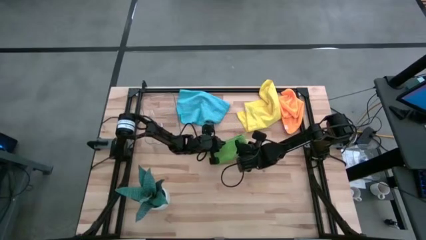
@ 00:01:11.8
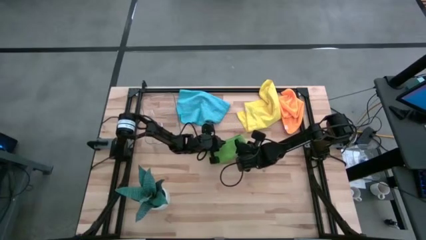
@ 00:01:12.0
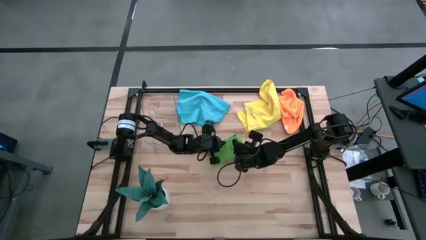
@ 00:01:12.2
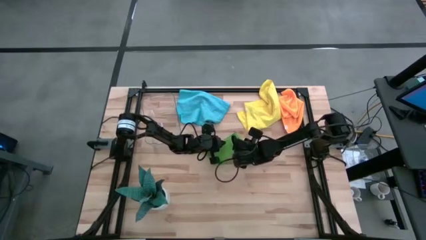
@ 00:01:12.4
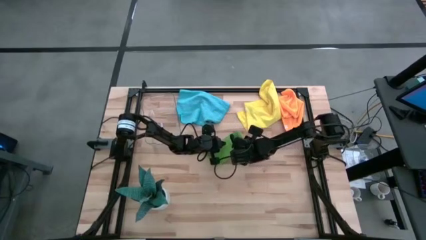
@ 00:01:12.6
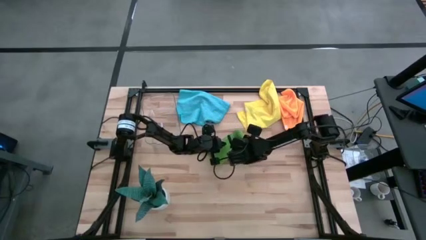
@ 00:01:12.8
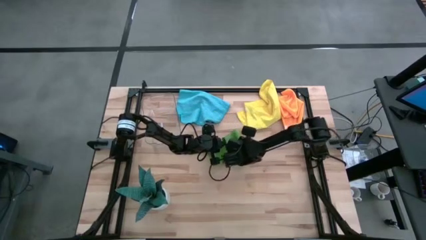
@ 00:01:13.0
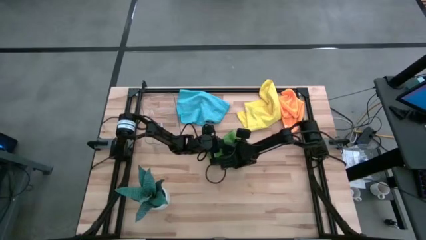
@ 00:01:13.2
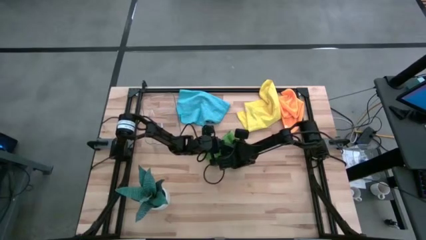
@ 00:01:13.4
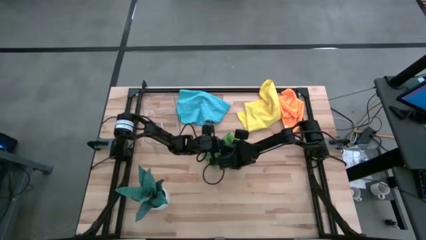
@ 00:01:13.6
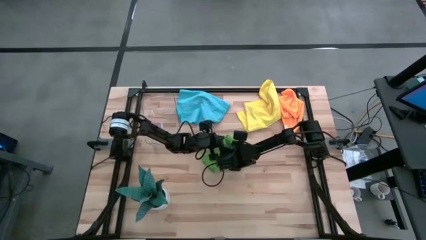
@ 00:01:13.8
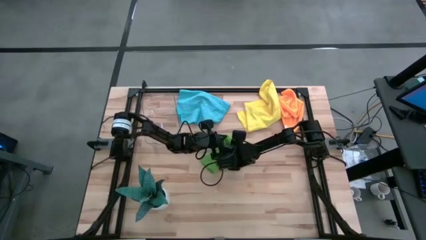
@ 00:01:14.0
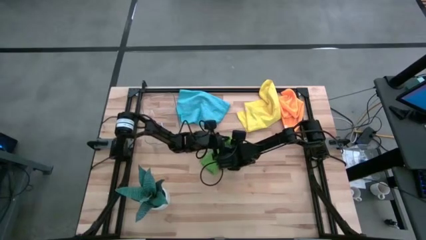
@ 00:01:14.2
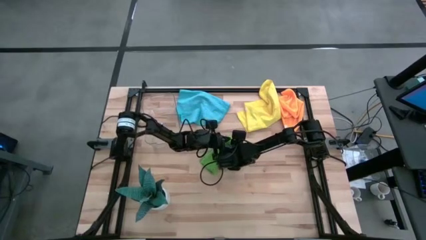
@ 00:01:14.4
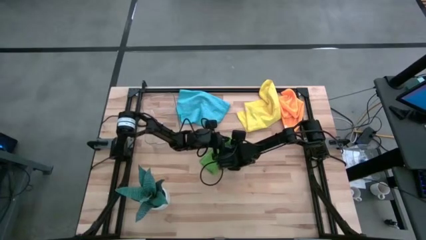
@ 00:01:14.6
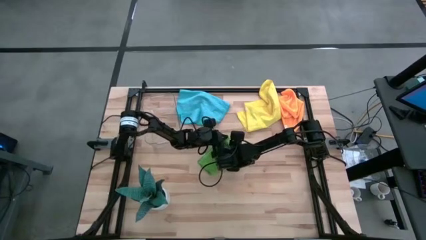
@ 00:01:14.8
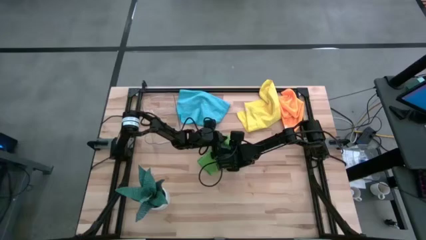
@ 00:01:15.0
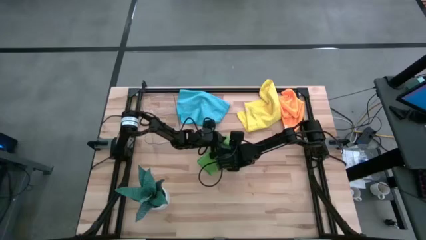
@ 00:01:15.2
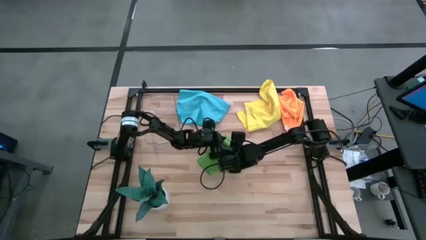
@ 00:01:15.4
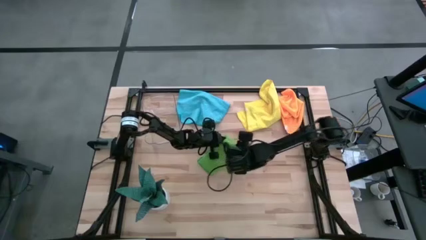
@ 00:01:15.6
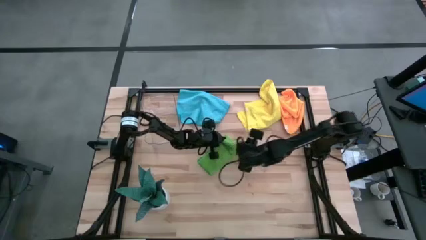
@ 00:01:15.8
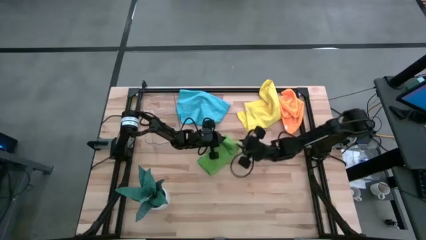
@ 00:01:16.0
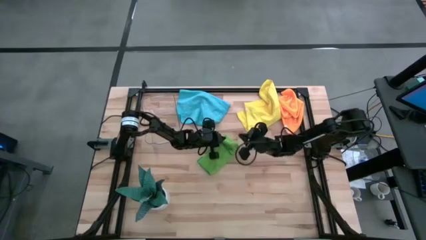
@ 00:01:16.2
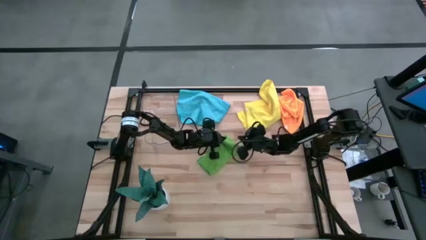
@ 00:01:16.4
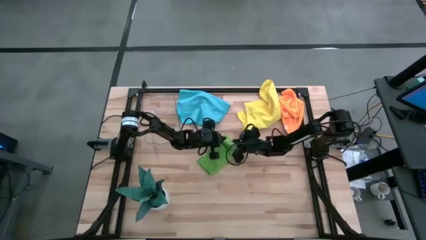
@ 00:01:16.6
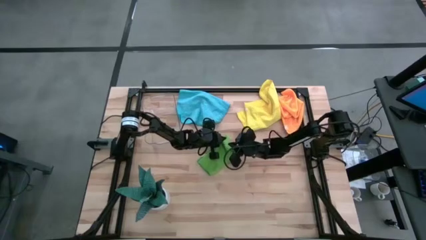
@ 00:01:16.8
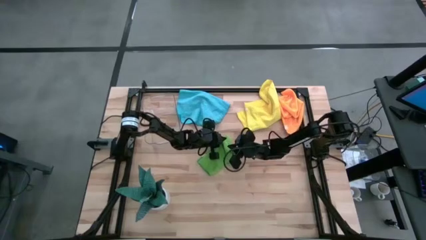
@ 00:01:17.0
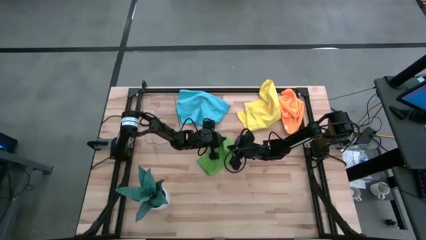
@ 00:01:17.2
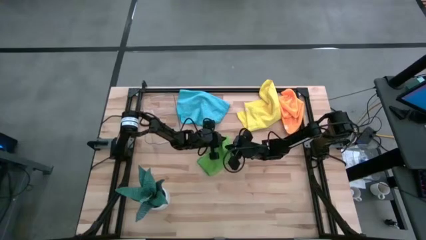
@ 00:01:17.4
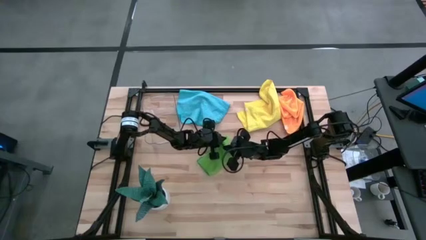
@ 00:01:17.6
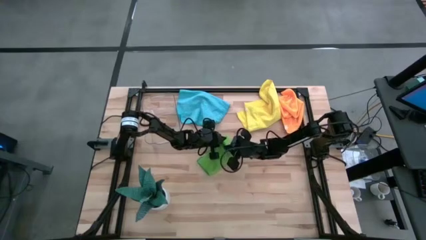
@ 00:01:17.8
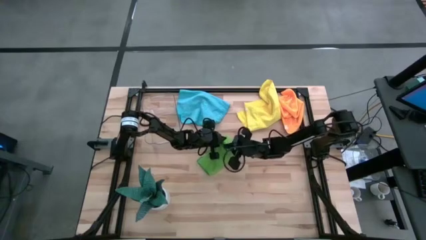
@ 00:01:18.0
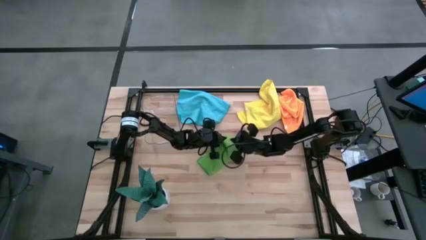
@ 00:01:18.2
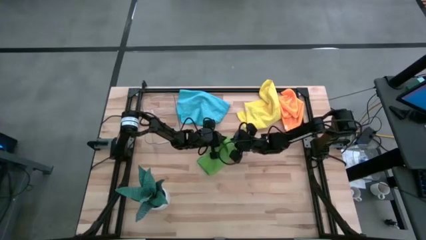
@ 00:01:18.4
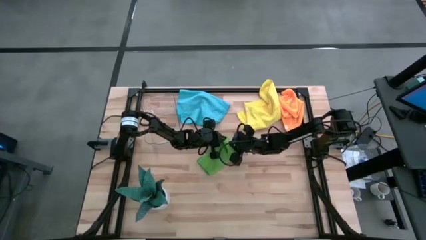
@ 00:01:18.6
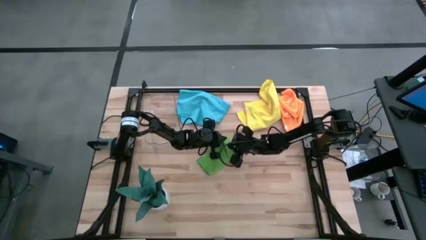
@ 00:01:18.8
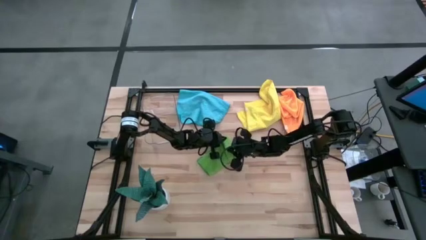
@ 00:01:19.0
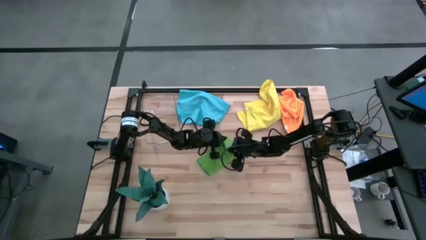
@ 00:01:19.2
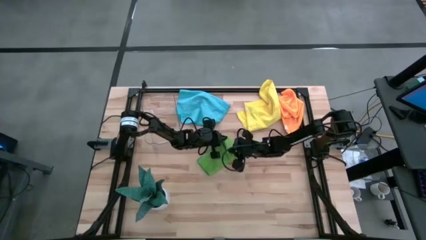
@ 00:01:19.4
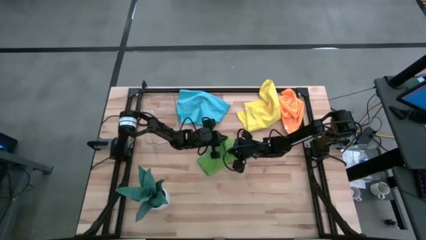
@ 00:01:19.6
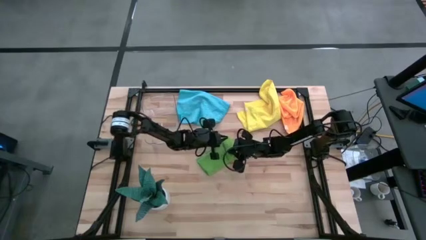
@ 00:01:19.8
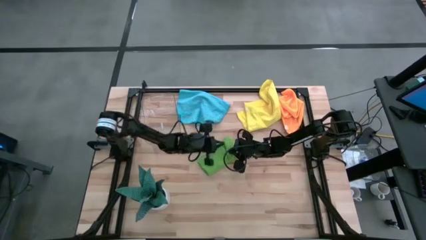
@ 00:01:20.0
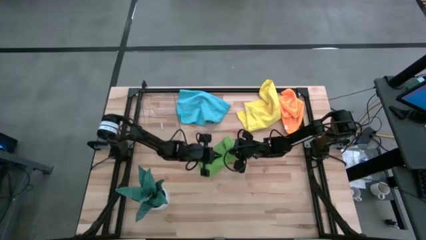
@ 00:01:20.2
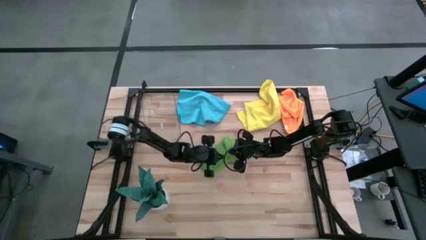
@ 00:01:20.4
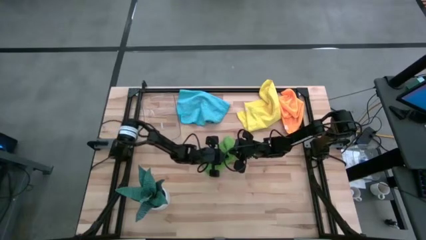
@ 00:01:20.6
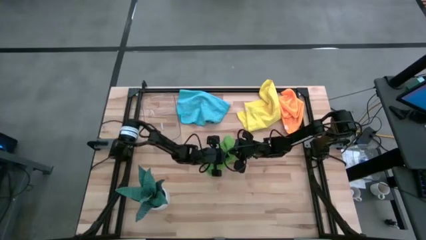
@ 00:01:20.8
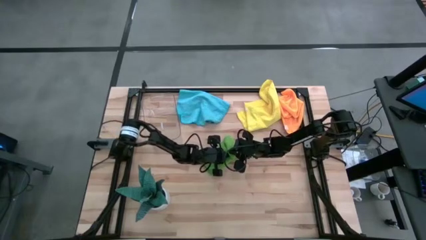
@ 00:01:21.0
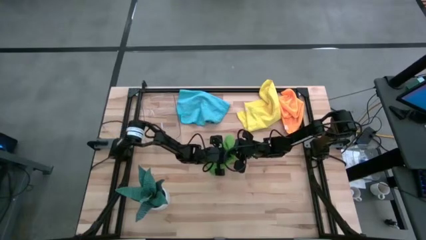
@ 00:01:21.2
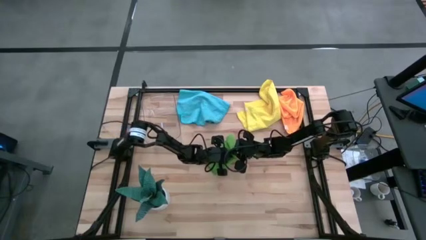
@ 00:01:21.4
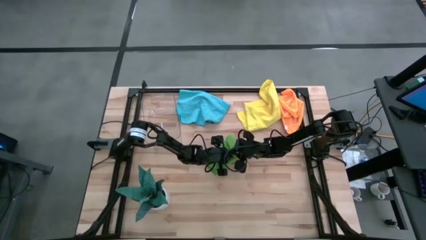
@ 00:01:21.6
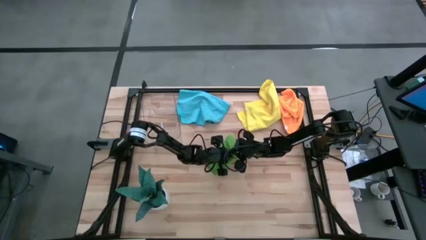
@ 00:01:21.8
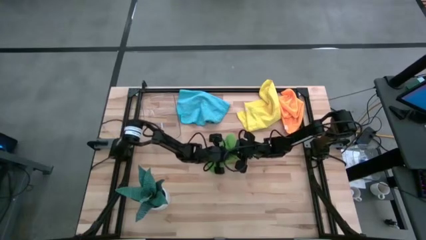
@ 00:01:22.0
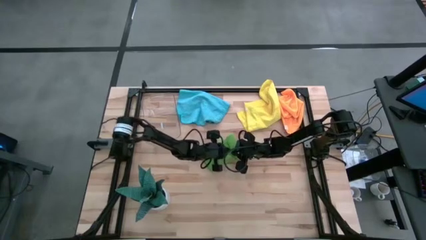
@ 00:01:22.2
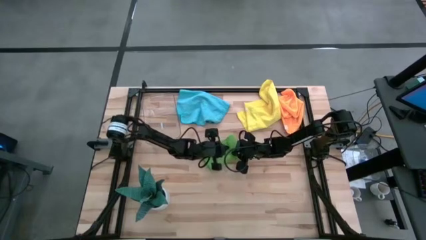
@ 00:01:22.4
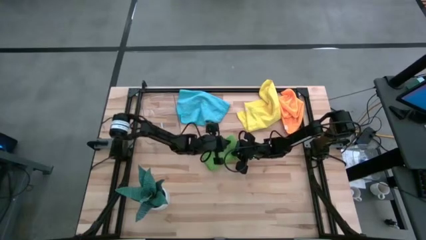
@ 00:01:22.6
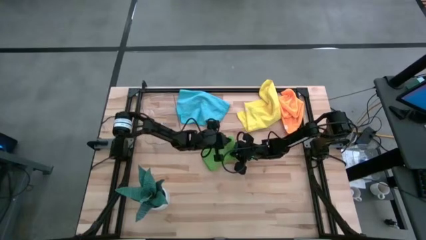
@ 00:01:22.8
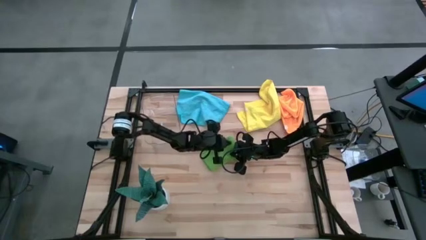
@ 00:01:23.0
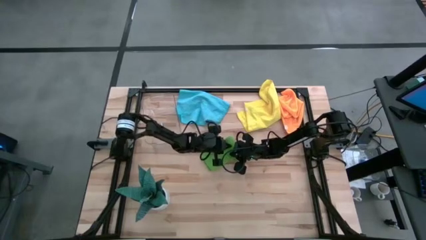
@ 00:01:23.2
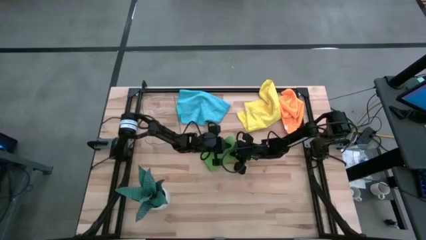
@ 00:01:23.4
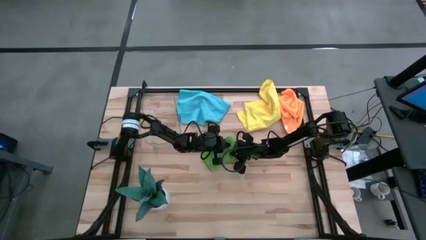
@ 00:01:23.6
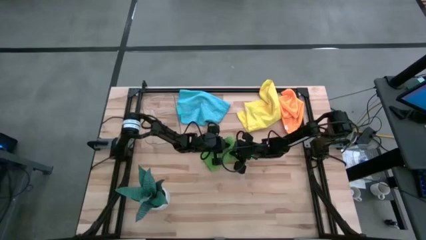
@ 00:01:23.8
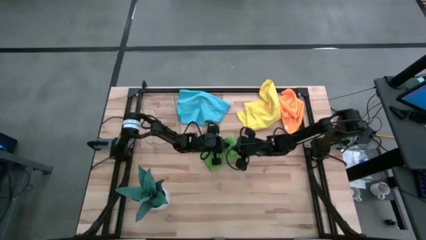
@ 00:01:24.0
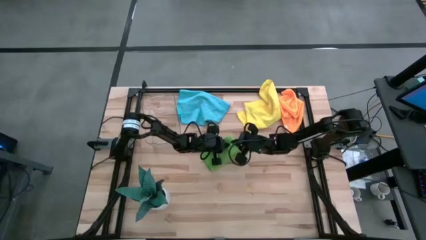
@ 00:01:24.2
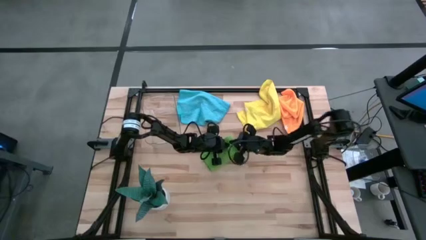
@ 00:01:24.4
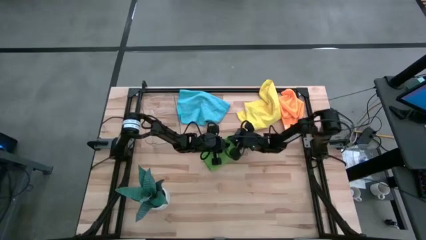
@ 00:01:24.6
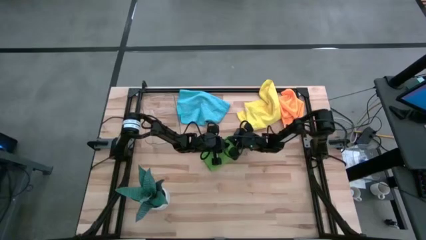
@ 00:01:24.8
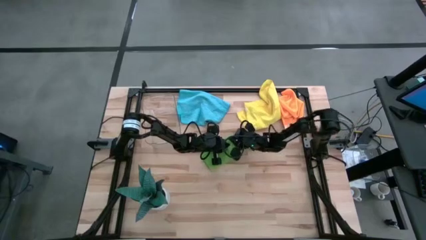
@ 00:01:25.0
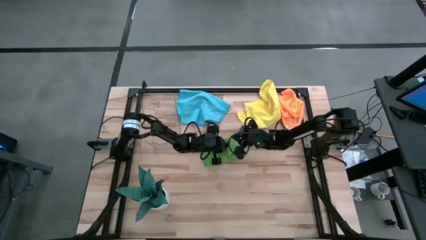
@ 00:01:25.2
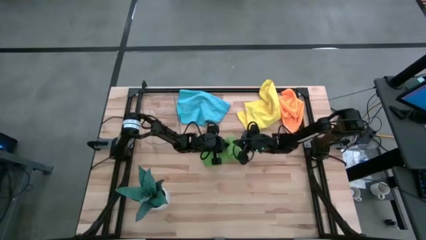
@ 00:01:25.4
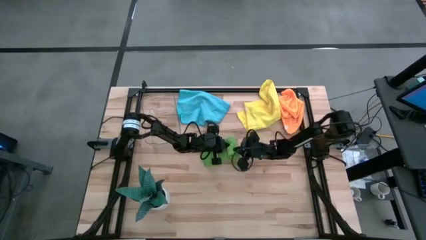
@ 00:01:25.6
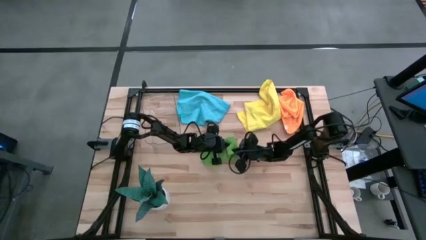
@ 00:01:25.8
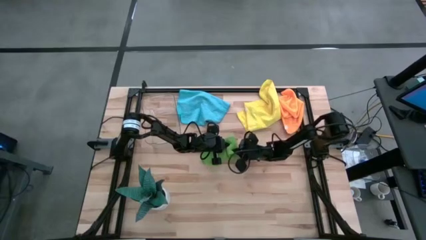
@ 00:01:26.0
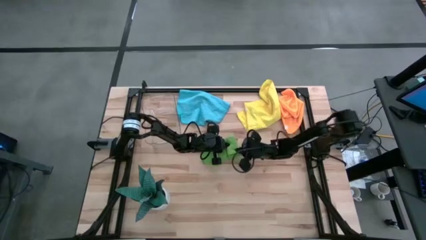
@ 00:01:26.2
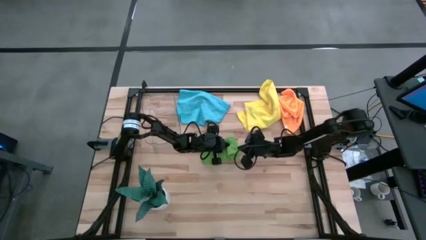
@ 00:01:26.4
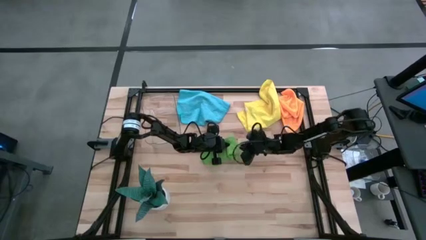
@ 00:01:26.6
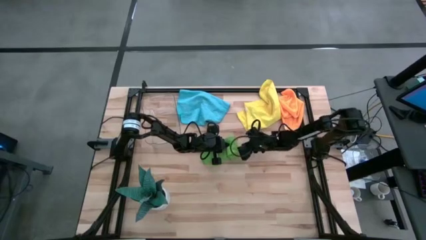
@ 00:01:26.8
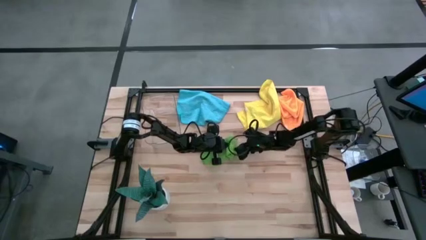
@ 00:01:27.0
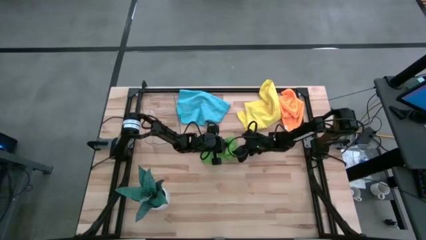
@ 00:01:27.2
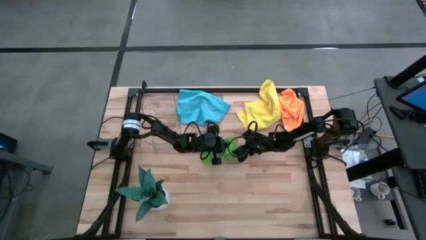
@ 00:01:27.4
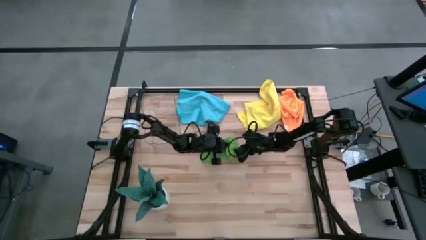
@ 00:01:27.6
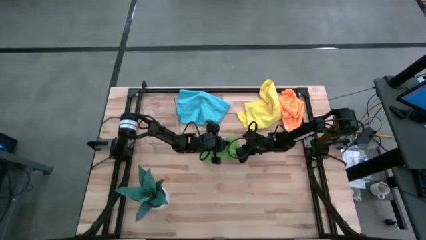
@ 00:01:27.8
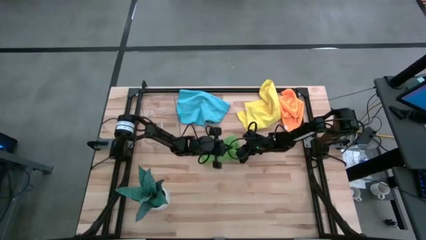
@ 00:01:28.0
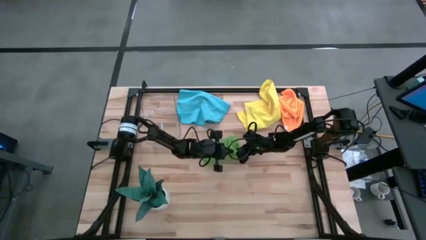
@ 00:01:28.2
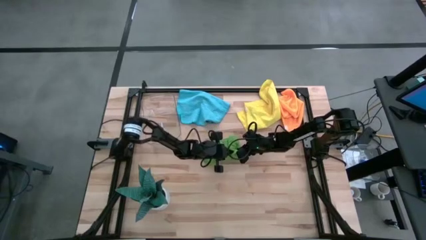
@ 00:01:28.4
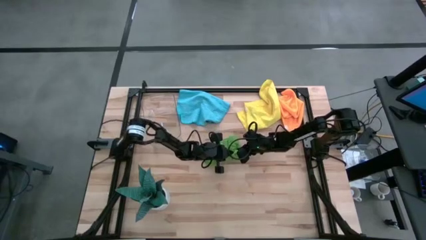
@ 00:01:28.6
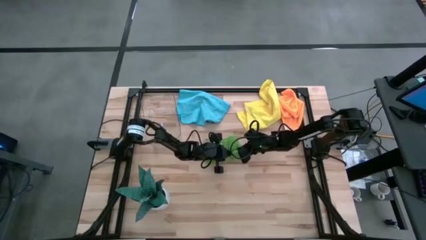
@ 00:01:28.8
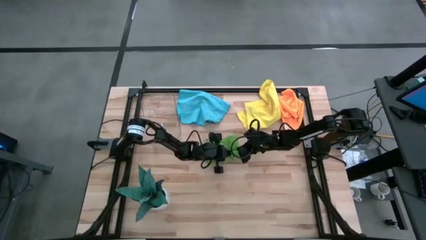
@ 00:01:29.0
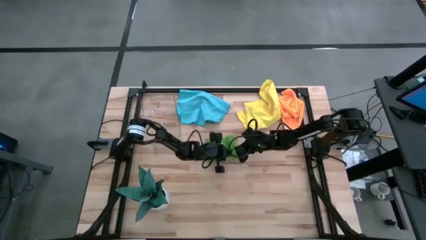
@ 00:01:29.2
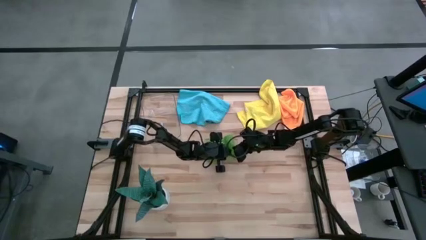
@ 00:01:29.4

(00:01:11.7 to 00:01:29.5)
Task: Roll microfiber towels into tight, uniform cylinder then place into a basket
Roll the green microfiber towel
